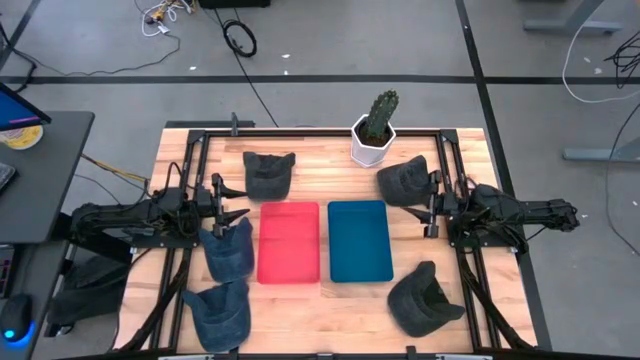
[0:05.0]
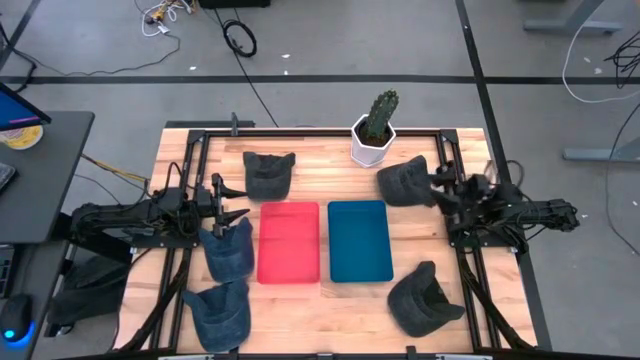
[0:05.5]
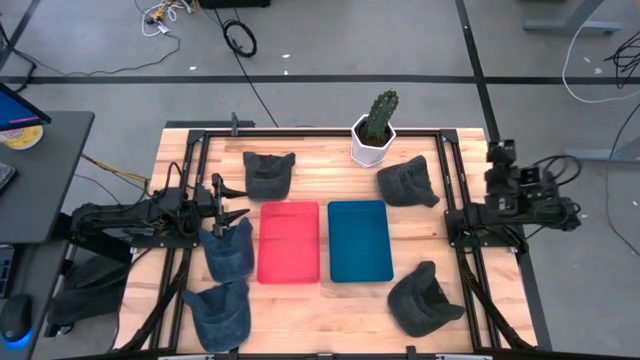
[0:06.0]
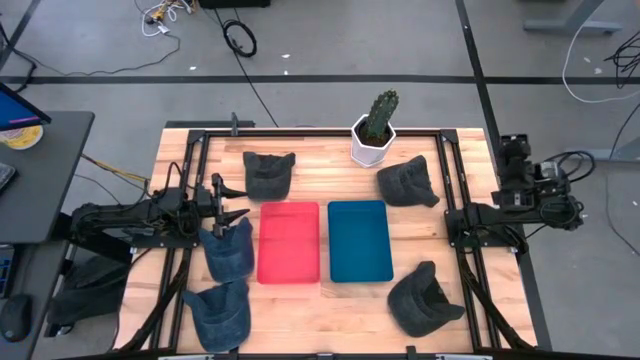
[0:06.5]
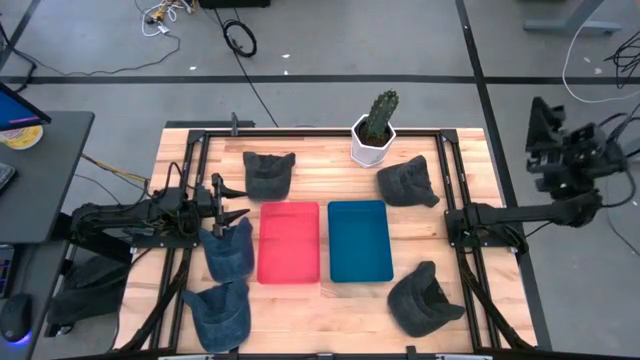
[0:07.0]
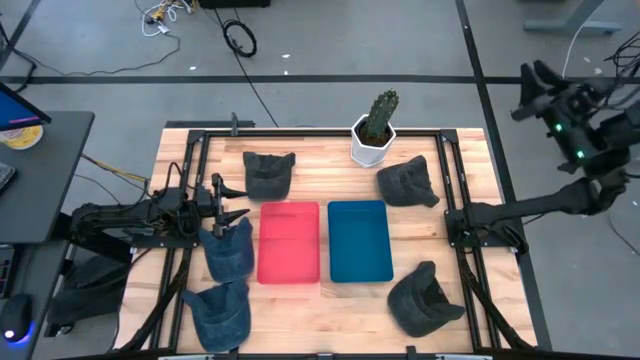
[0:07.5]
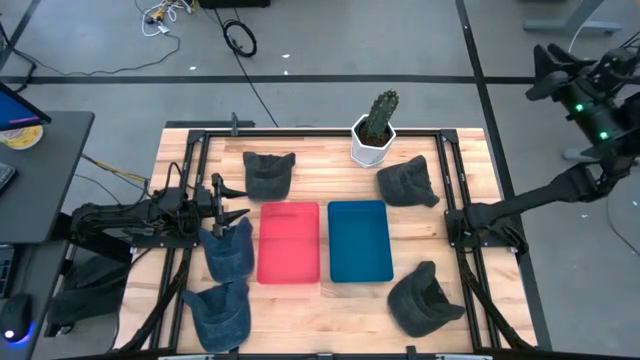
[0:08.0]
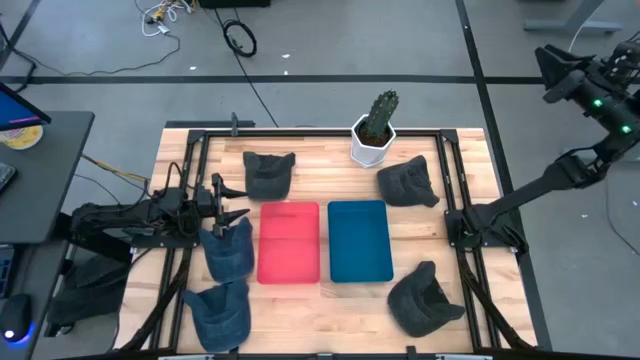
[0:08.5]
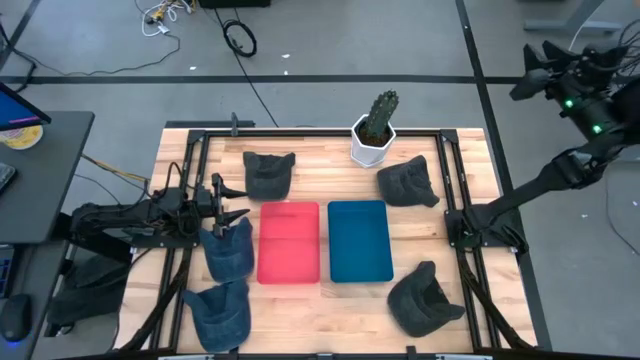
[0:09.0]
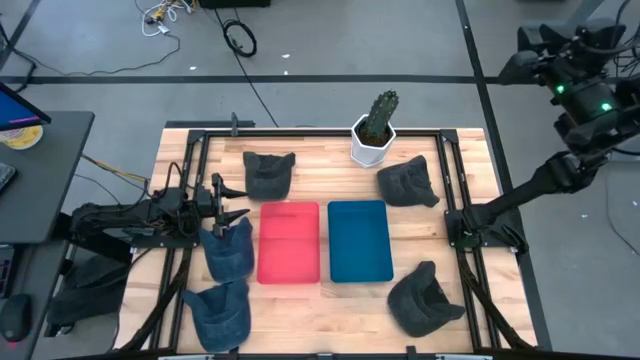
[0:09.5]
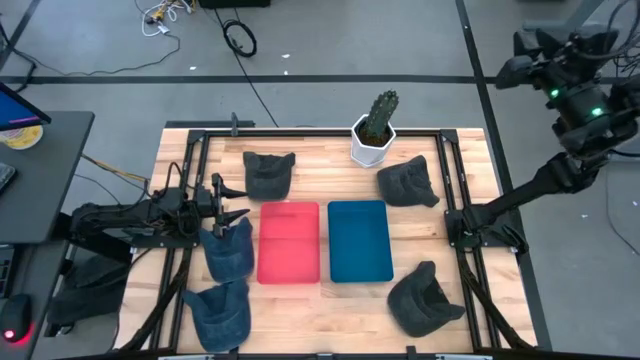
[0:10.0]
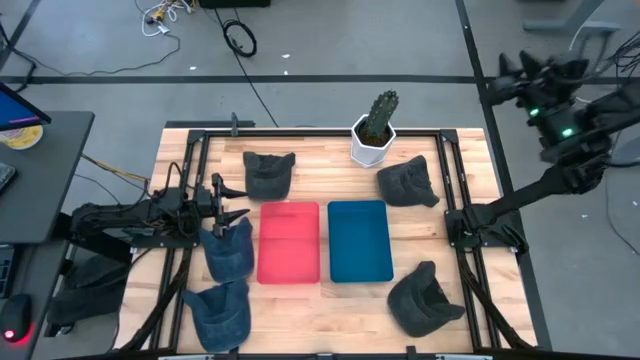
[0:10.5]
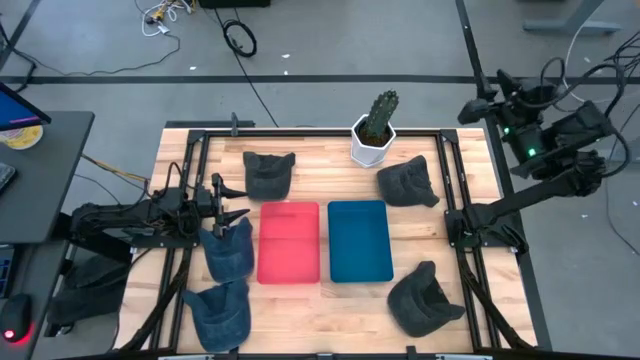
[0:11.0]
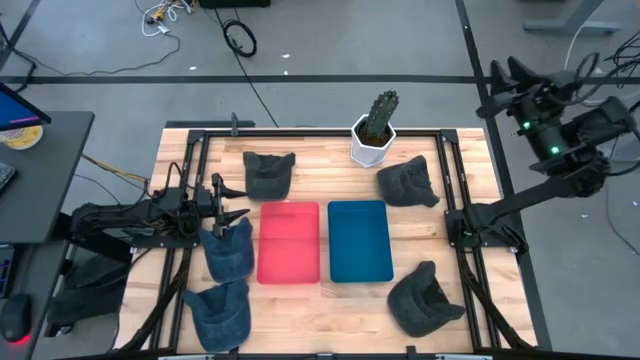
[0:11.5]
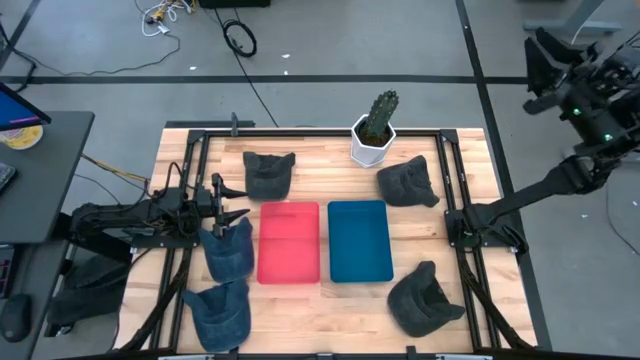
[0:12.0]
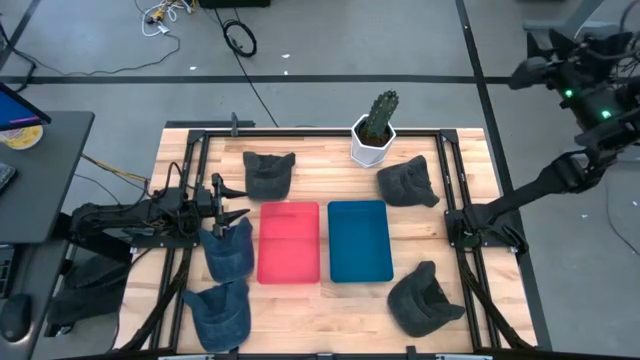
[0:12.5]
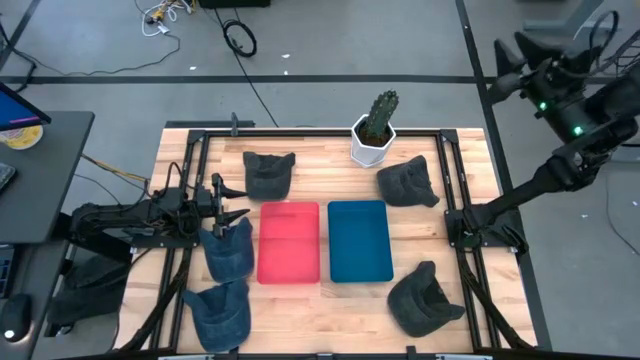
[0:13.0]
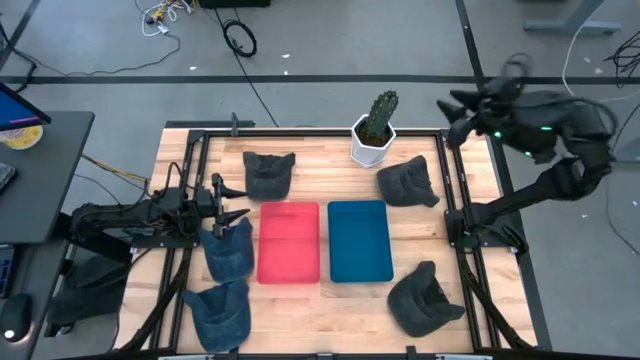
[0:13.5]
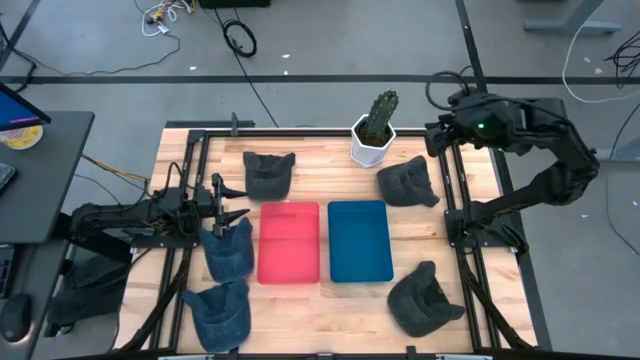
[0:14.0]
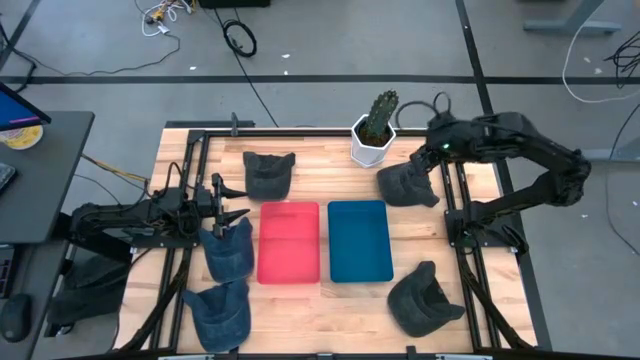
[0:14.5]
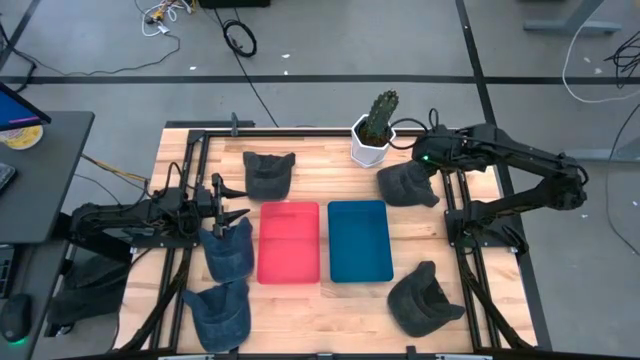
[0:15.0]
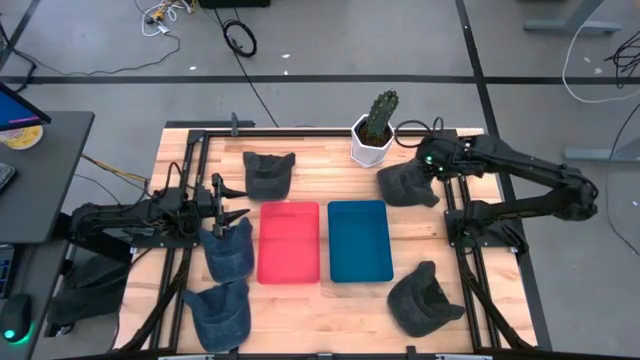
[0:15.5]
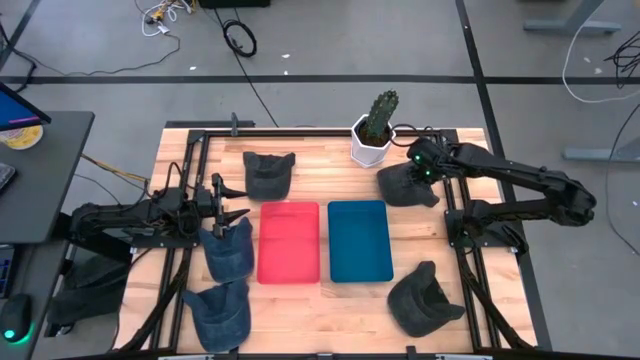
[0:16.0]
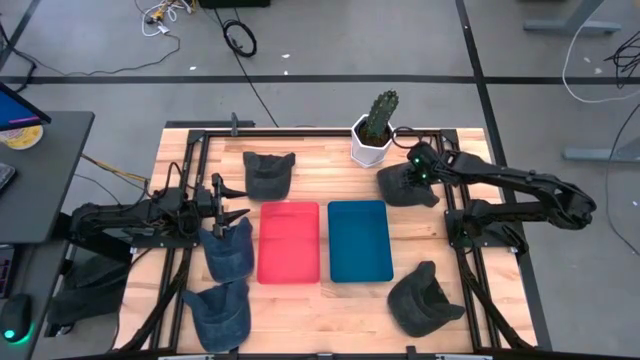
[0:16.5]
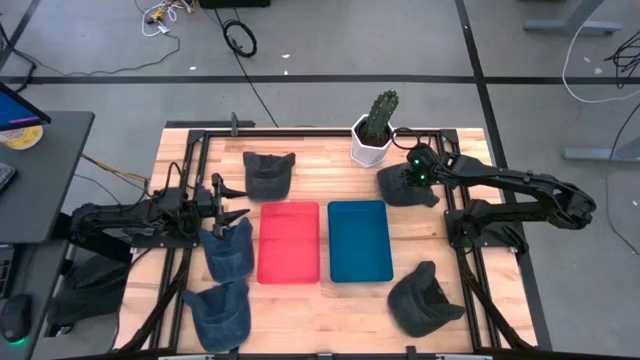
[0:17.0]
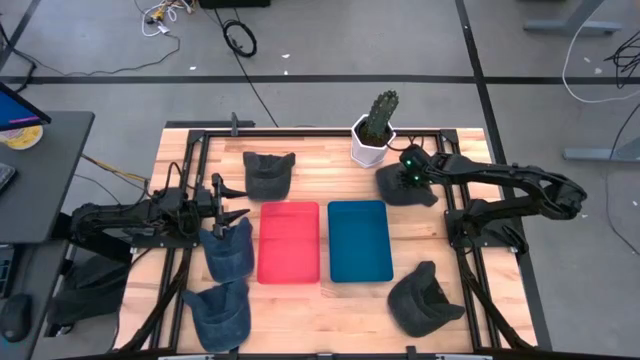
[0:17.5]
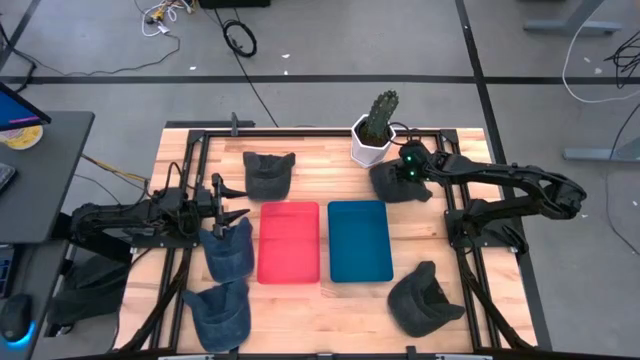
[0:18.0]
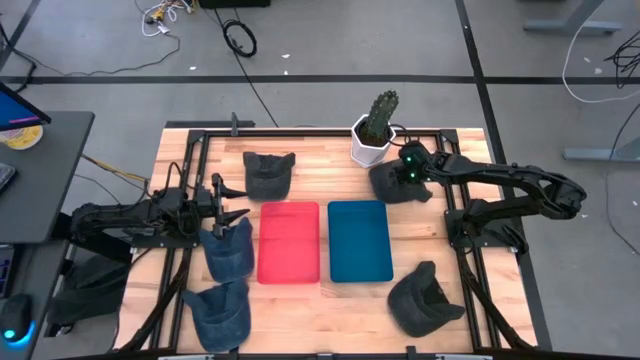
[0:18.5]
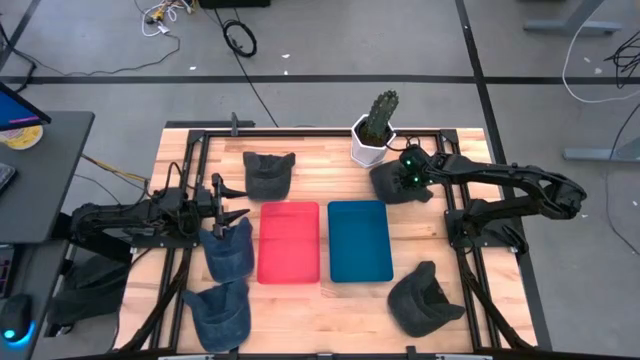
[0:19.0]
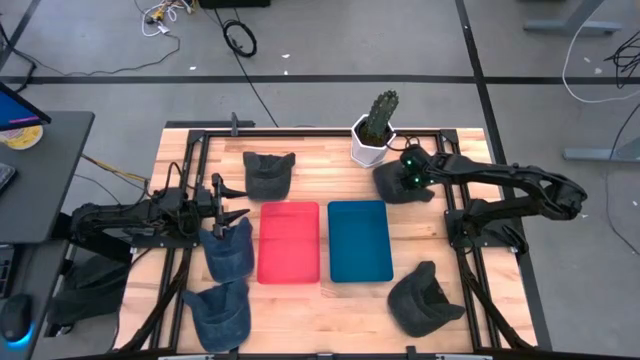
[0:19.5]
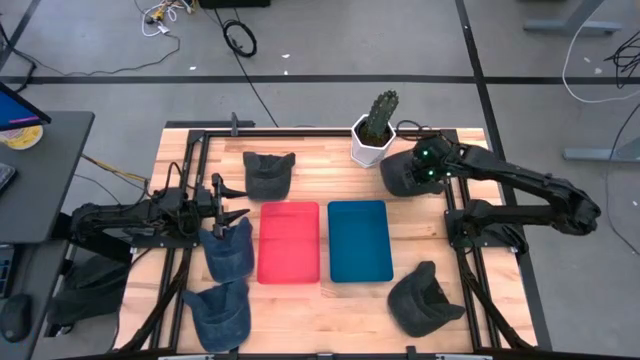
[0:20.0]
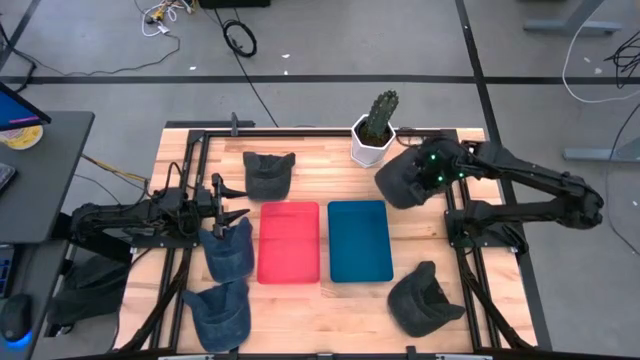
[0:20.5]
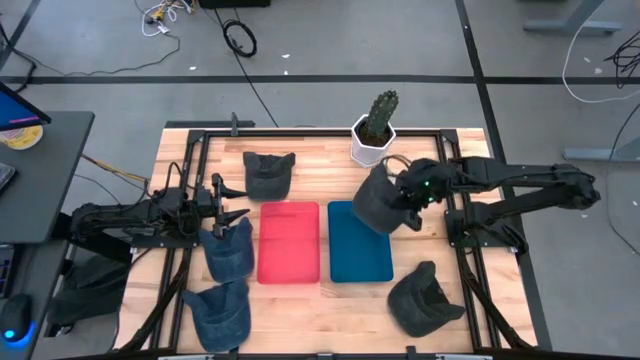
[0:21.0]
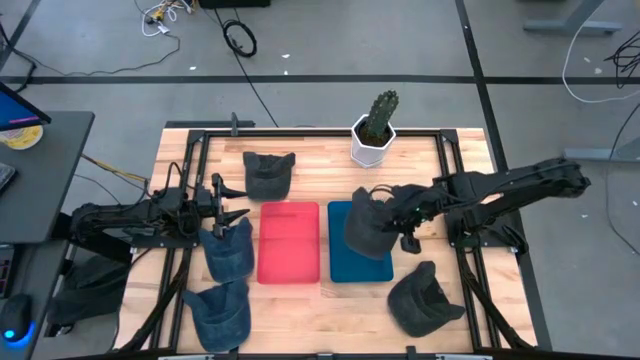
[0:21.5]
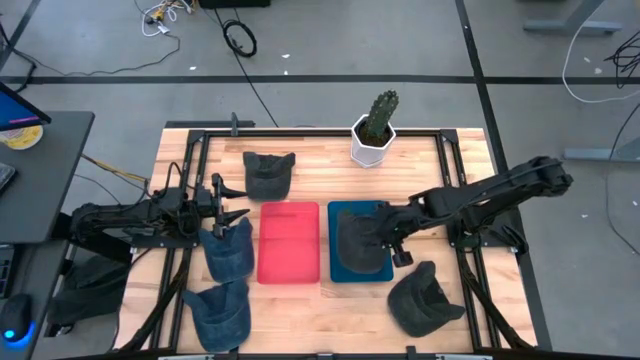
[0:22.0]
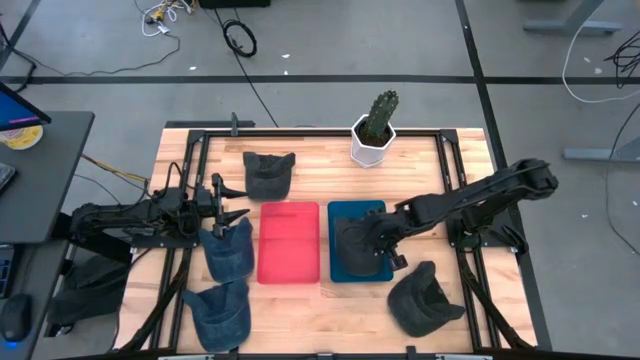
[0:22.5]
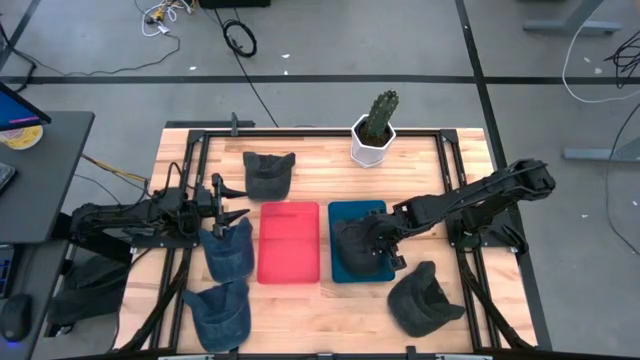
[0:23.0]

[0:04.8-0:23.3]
Task: Pick & Place hat
Put the top right gray cap into the bin
